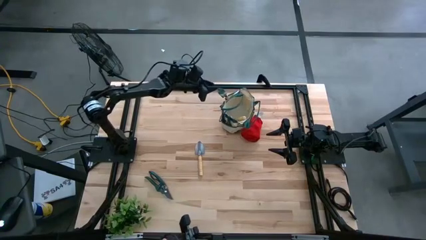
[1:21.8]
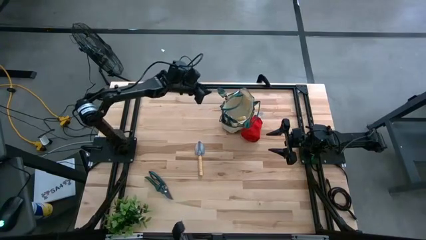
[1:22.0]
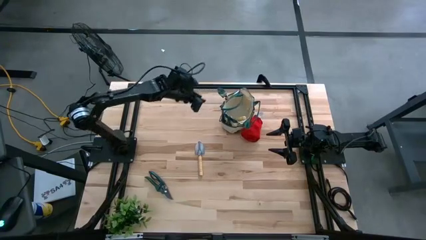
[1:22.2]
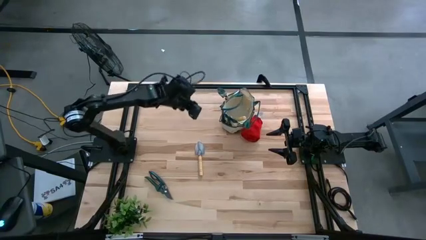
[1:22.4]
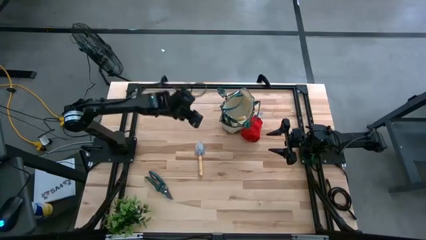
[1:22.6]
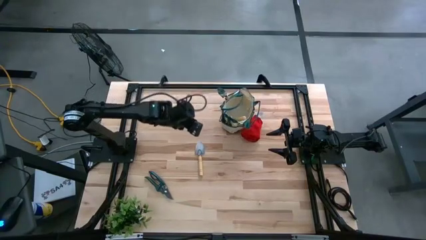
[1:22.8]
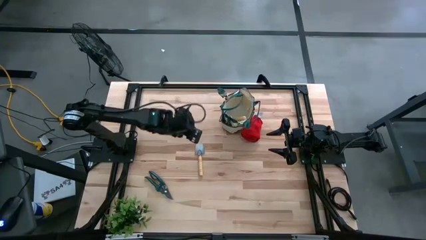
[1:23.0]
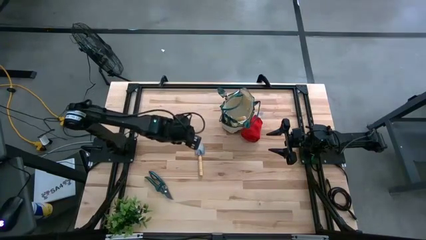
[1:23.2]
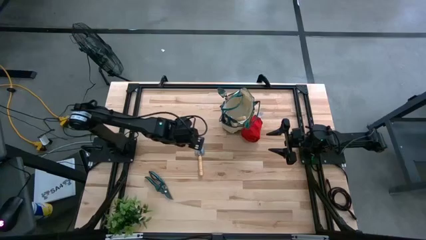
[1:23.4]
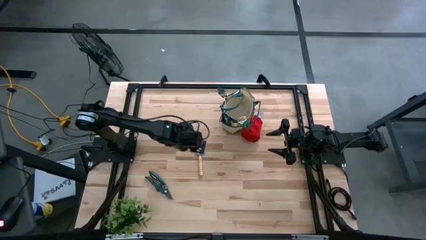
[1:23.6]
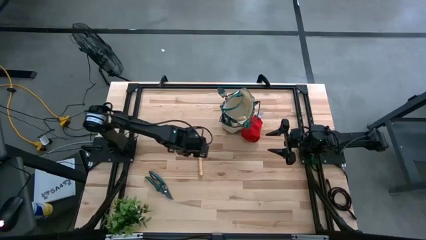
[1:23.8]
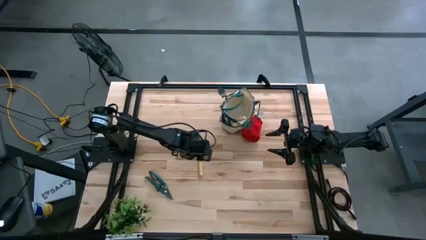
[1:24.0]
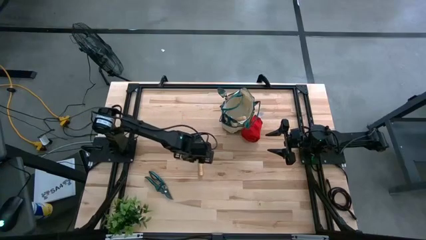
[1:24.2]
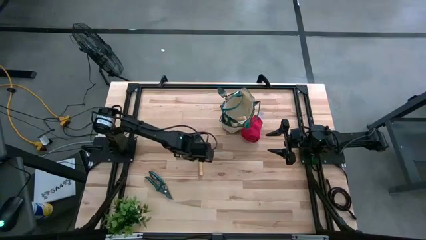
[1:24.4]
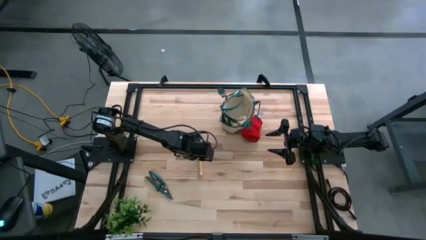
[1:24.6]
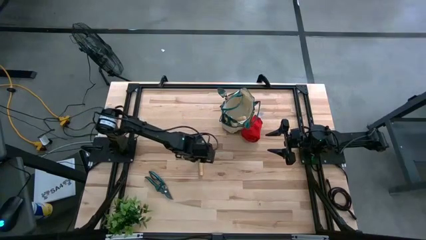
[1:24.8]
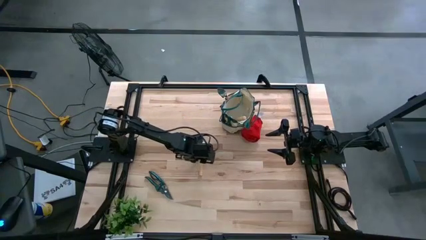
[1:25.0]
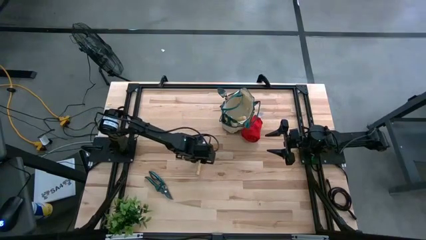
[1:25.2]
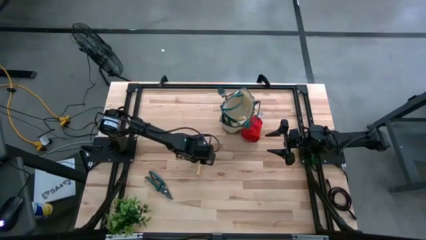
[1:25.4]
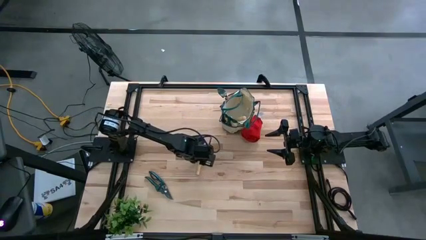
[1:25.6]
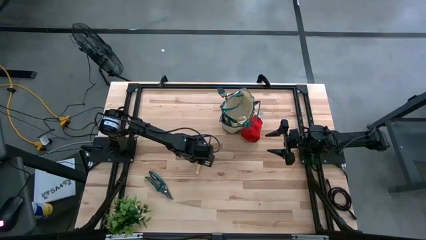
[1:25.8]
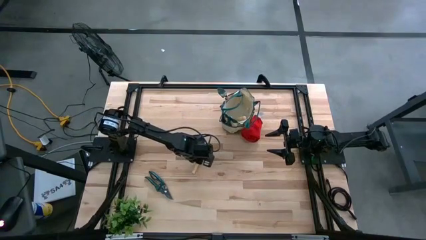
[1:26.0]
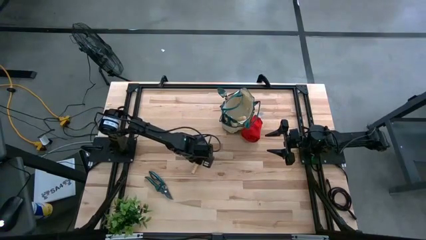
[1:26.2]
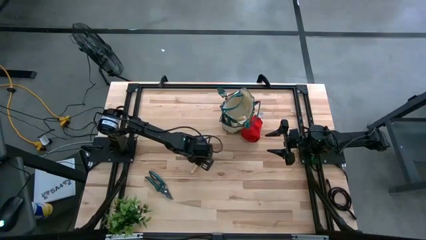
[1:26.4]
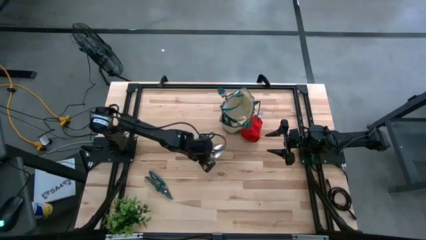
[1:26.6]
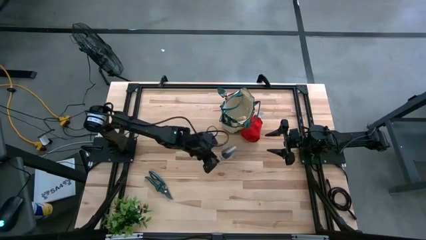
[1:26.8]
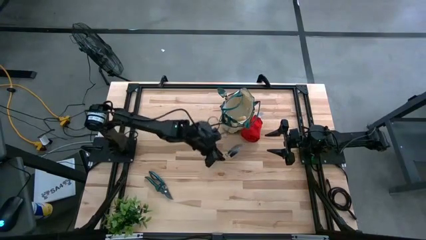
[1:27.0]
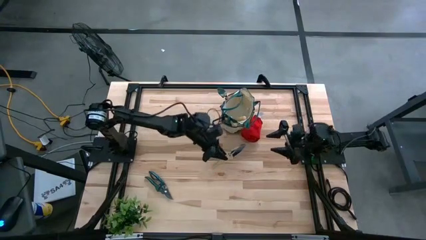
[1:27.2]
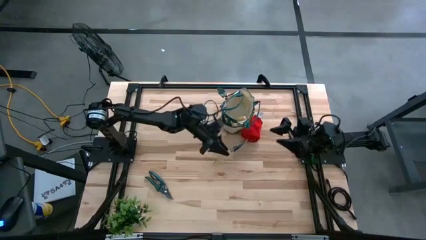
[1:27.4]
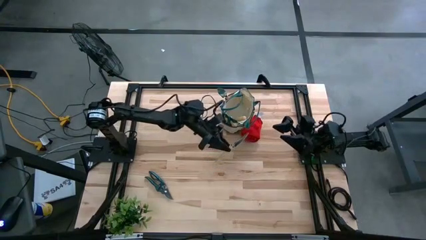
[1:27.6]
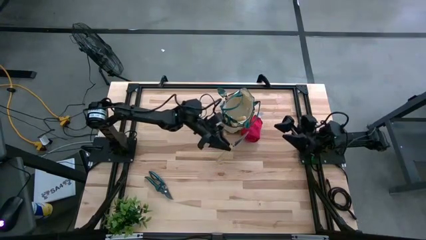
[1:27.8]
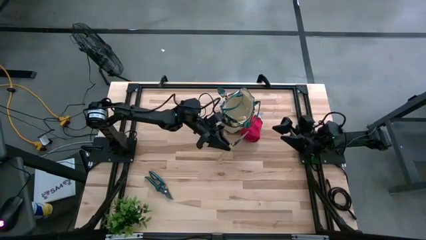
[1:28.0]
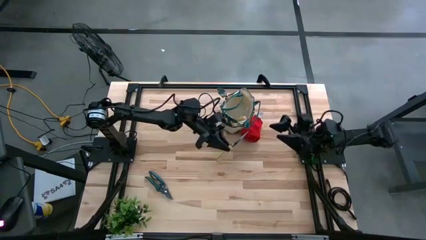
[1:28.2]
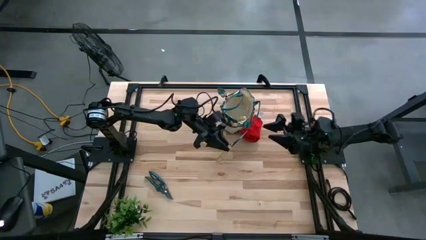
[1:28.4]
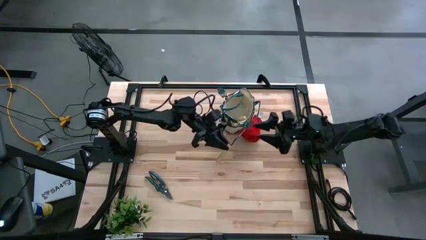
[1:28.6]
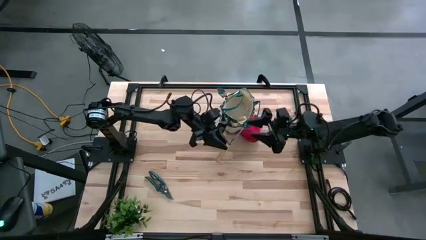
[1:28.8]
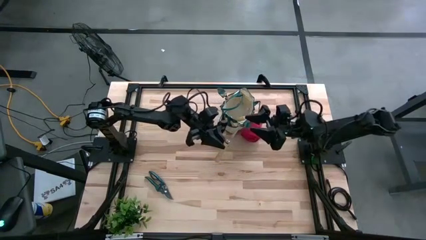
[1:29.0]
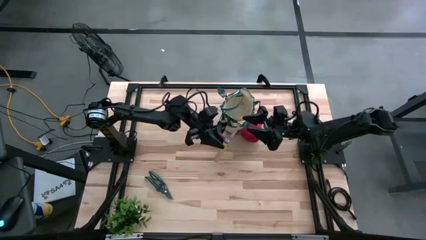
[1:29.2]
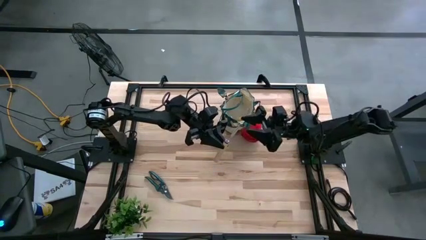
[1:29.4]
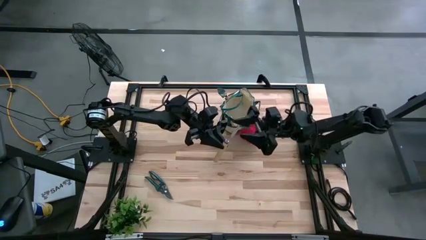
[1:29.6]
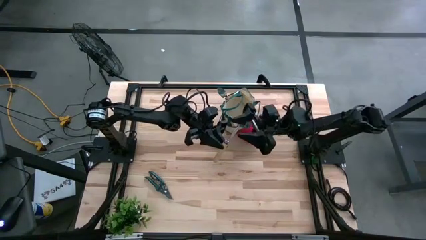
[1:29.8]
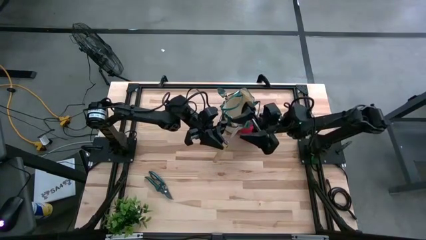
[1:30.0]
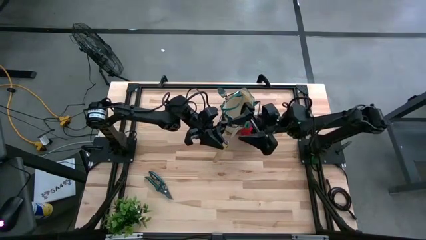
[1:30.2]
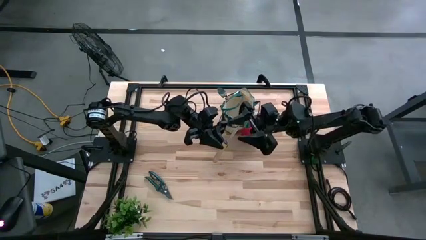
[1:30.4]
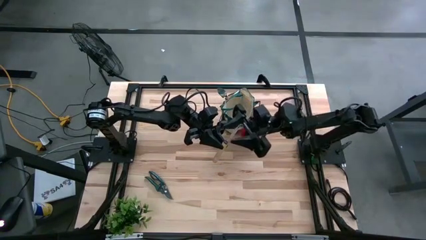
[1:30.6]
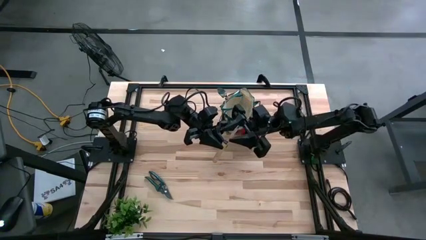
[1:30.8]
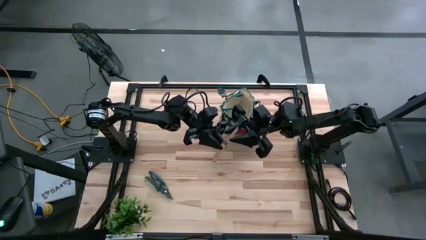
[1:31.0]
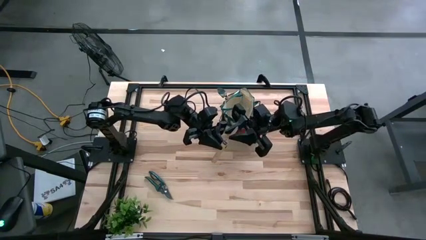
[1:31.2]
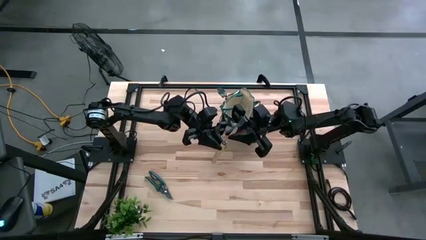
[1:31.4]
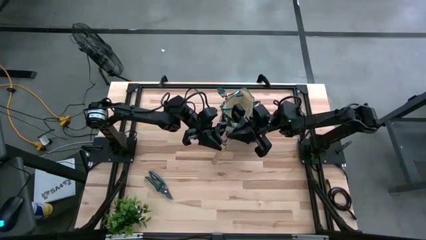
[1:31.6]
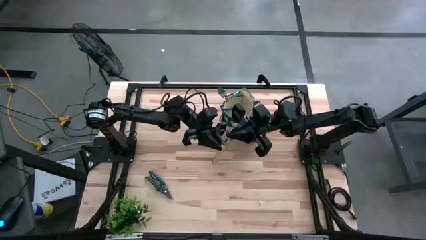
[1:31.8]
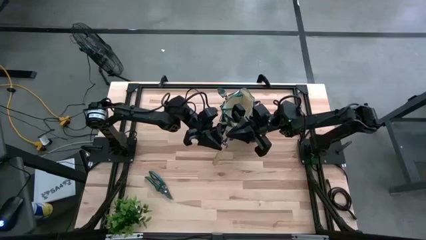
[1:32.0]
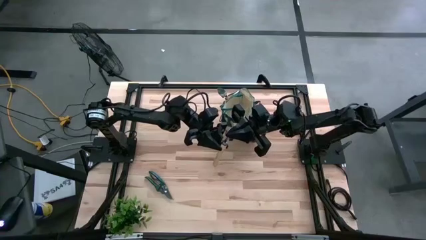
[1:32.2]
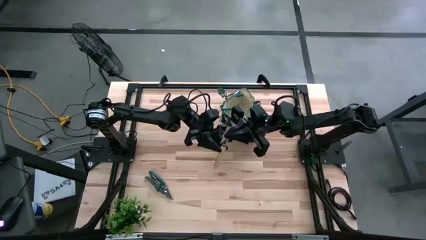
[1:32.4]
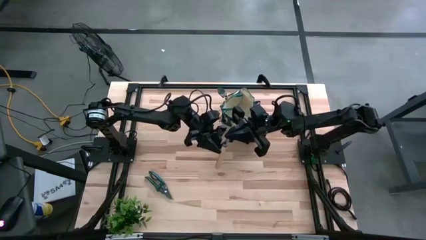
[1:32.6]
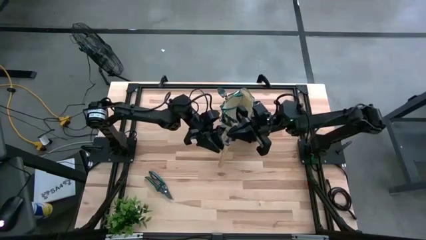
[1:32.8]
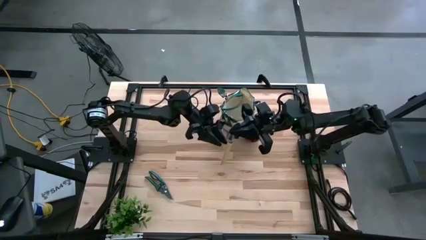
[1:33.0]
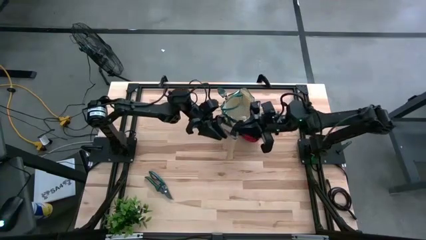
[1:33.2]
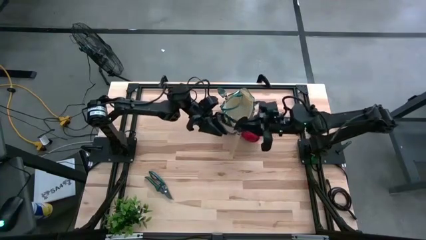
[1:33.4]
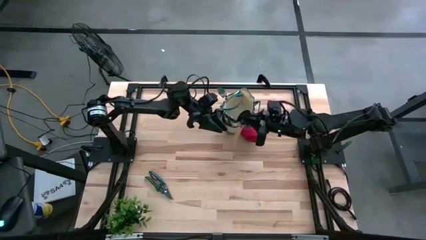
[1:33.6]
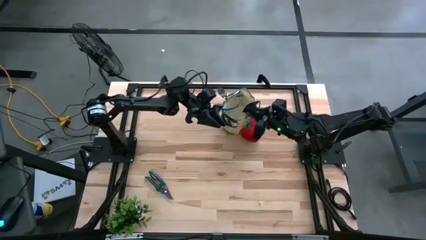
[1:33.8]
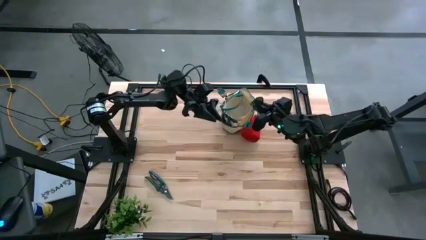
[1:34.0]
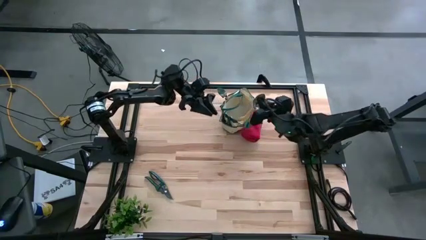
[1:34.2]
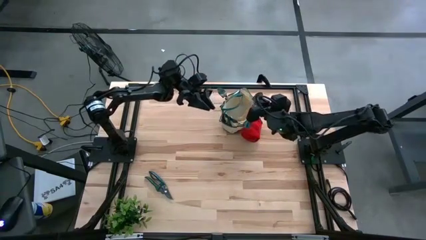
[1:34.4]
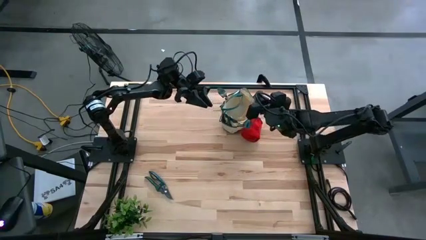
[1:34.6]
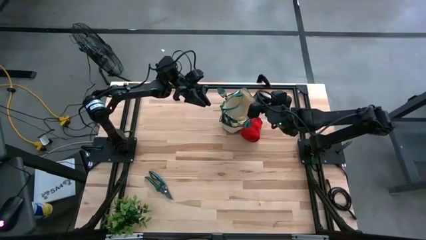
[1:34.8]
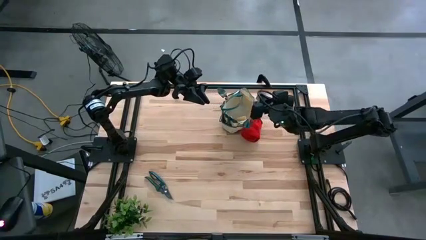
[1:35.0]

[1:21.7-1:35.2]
Task: Pick & Place Garden tools in Gardening bag
Put the brown trowel into the gardening bag

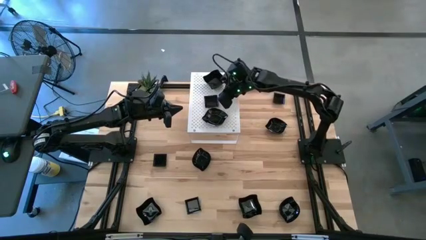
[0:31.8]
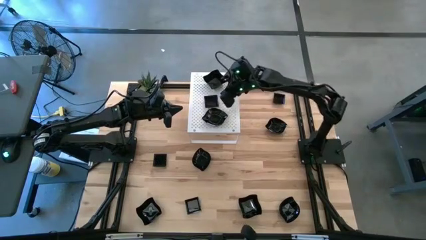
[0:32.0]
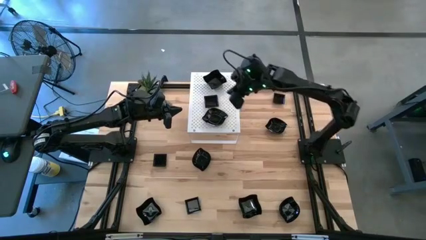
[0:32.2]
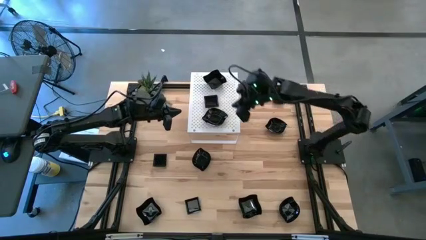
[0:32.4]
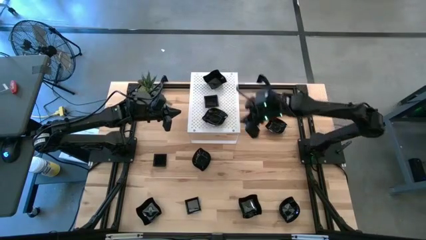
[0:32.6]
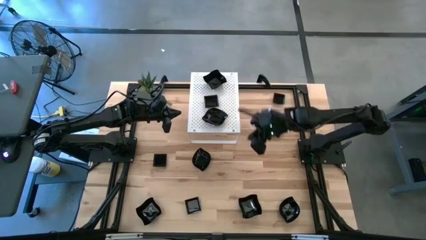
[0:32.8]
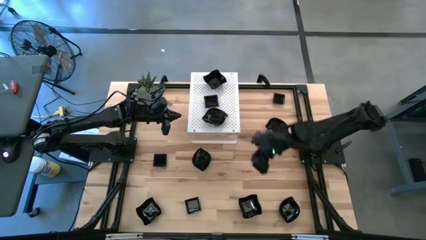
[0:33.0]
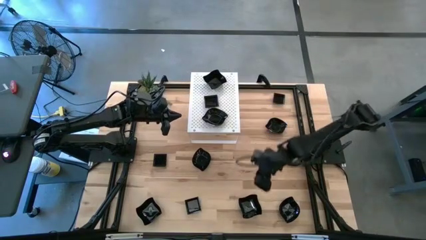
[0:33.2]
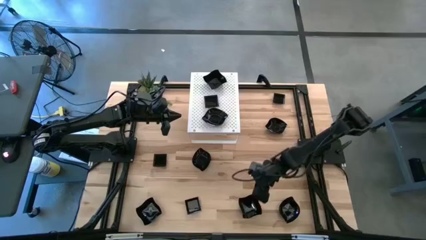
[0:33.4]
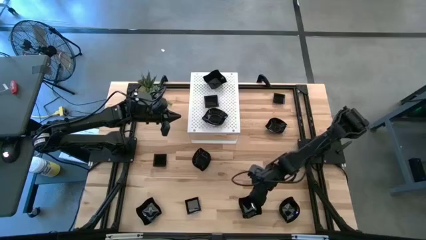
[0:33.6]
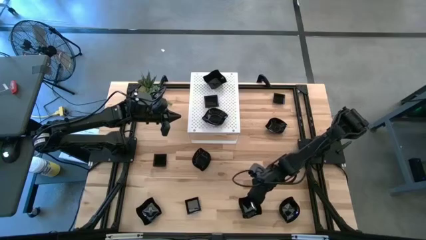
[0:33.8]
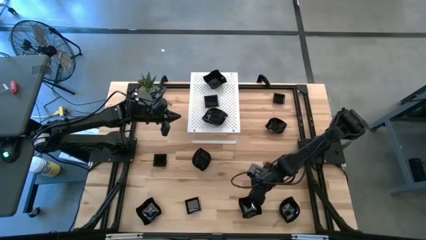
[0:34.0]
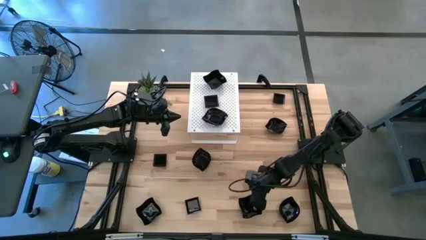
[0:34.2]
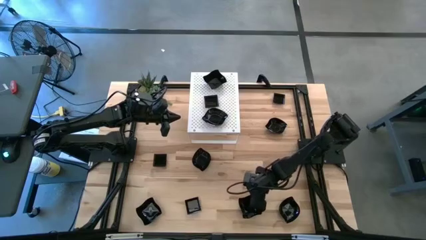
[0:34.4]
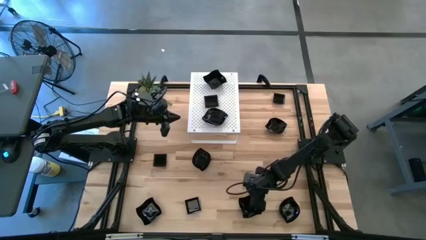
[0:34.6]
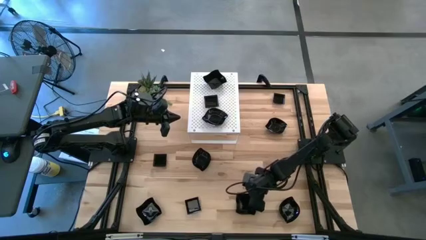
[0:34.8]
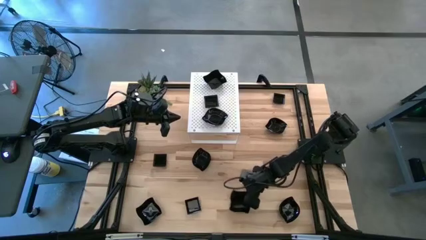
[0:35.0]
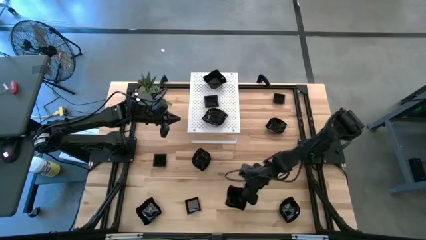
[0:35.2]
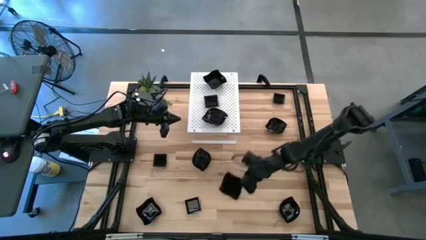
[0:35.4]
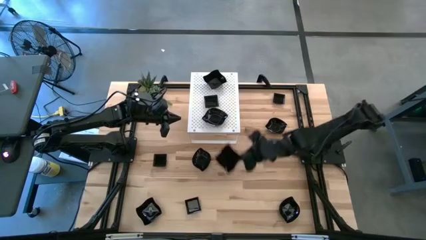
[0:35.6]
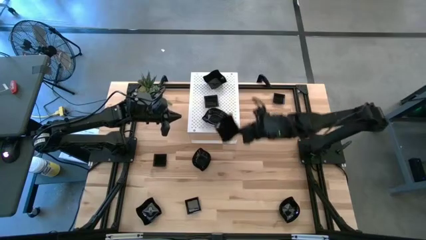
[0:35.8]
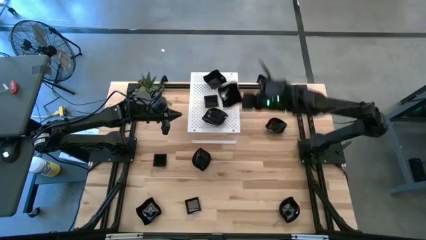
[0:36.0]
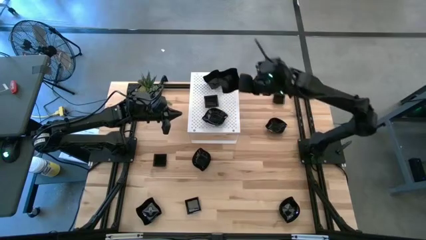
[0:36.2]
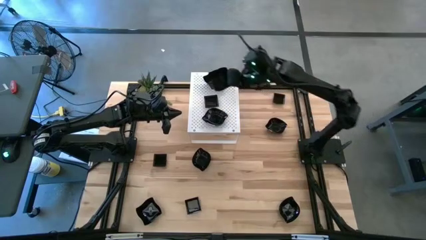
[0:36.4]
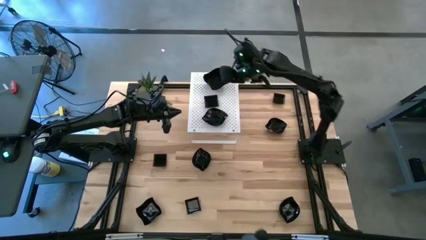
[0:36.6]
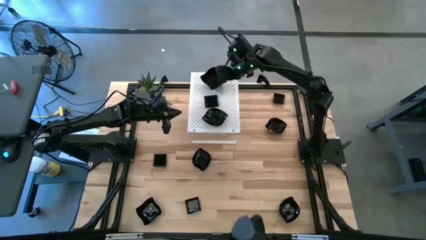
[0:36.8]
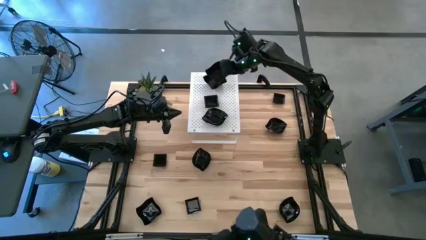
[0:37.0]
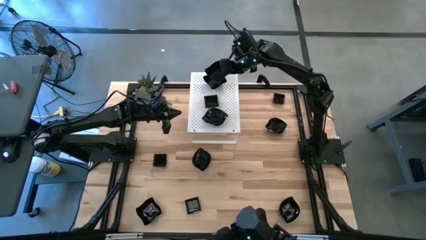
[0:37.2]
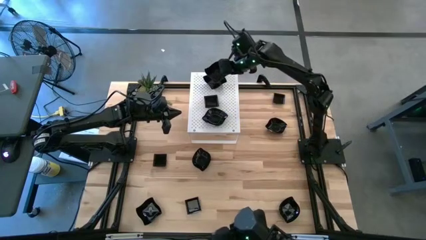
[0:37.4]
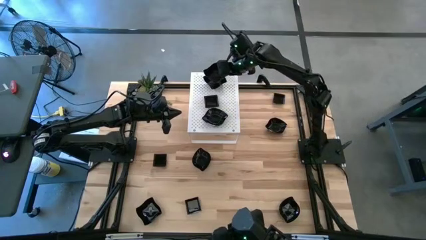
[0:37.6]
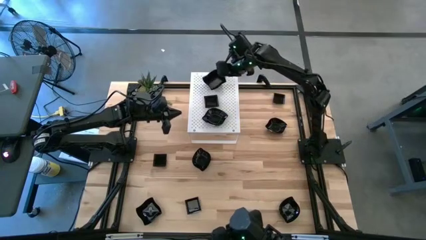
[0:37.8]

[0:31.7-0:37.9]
Task: Pick & Place Mini shaped plates
Stack the black distorted square plate on top of the black distorted square plate on the shelf
